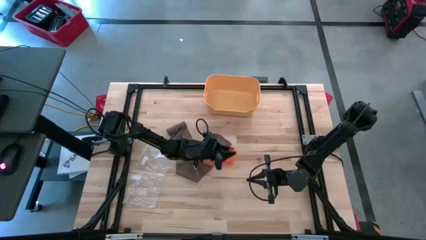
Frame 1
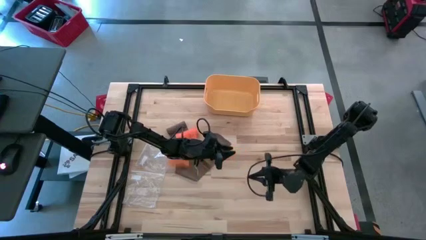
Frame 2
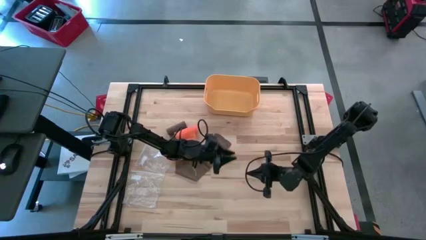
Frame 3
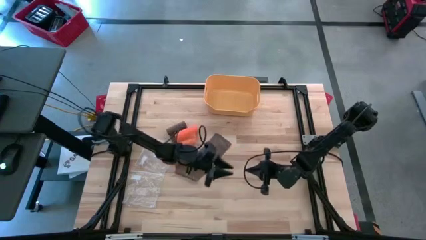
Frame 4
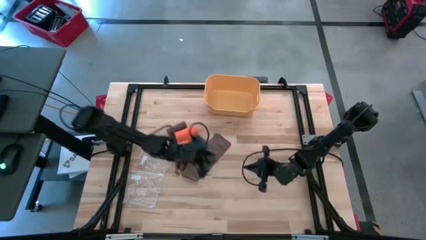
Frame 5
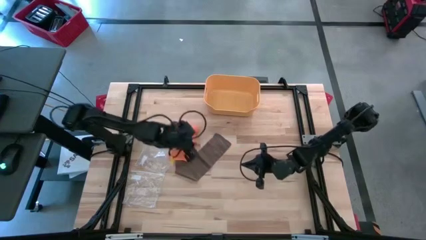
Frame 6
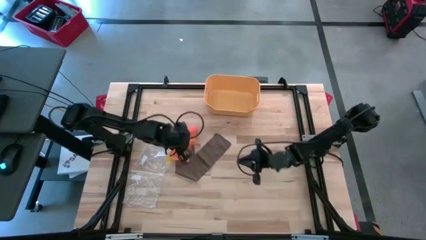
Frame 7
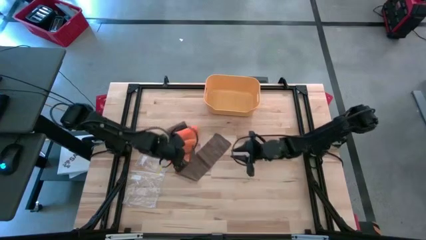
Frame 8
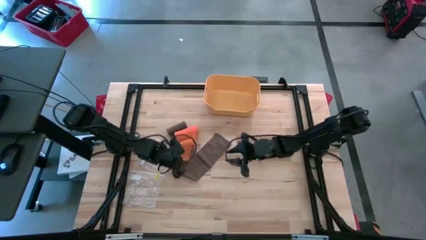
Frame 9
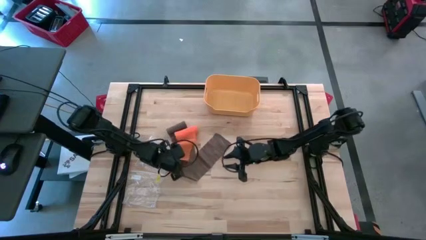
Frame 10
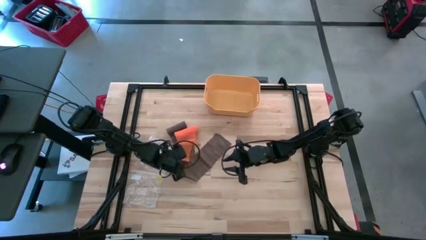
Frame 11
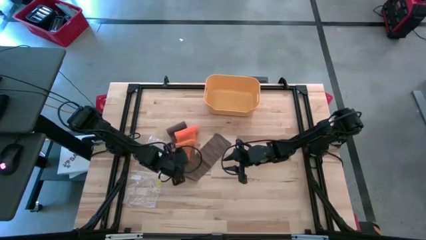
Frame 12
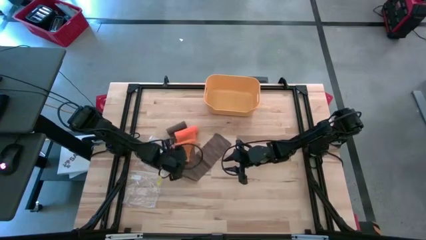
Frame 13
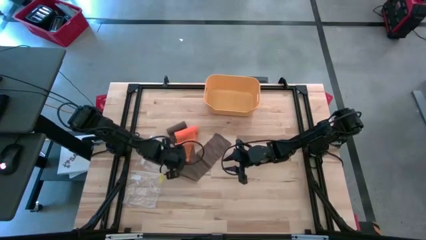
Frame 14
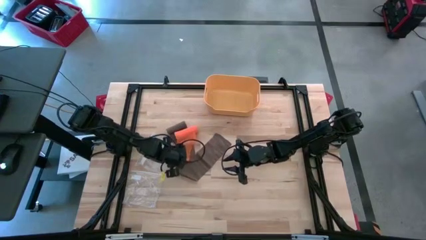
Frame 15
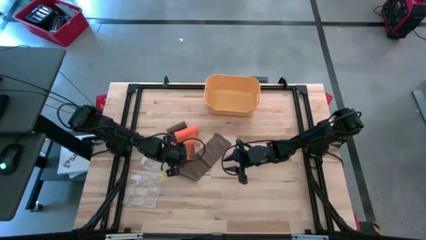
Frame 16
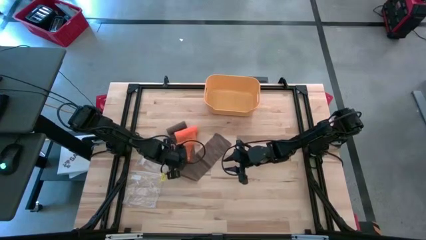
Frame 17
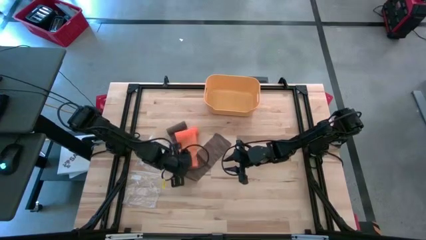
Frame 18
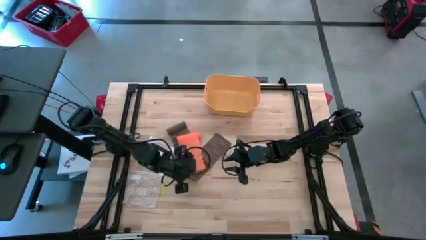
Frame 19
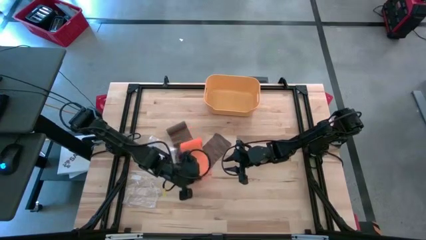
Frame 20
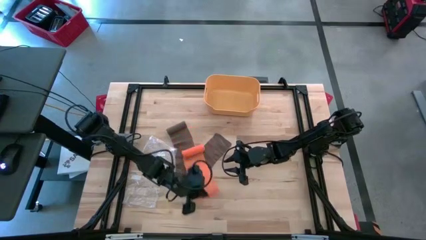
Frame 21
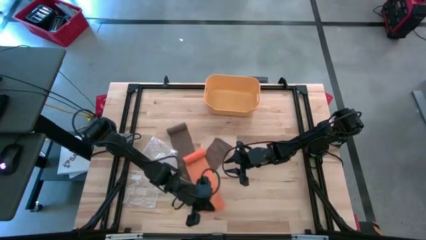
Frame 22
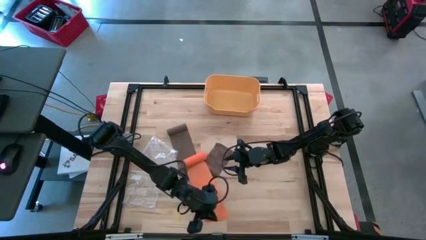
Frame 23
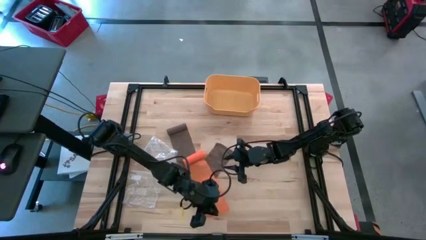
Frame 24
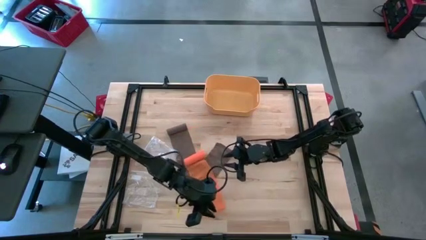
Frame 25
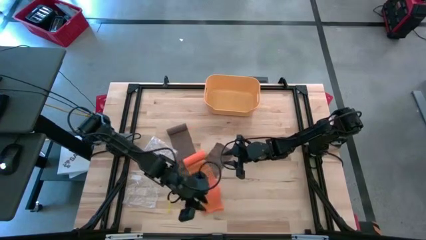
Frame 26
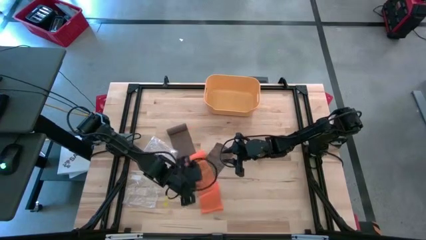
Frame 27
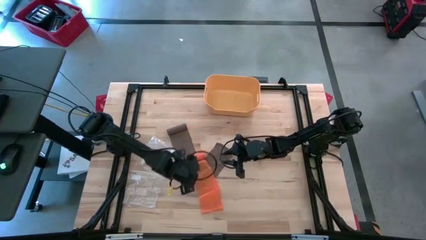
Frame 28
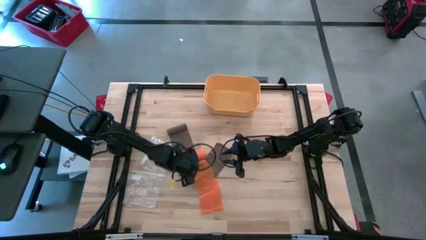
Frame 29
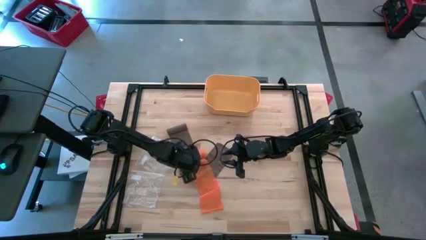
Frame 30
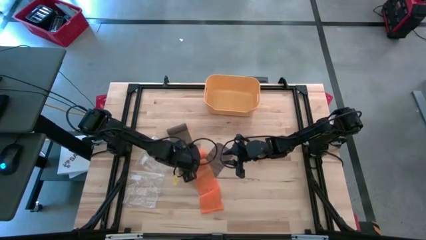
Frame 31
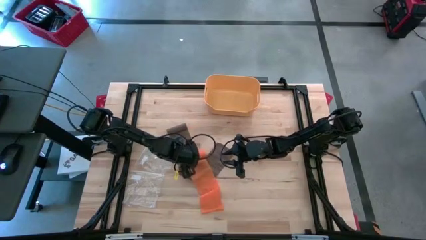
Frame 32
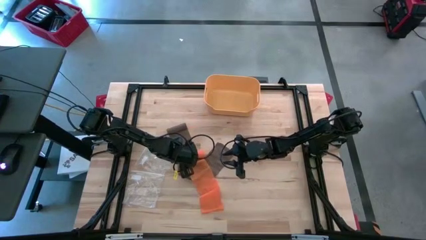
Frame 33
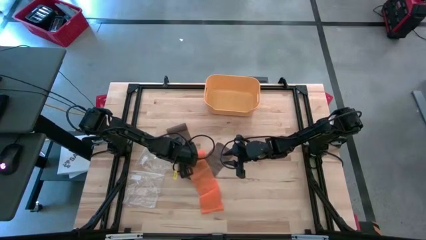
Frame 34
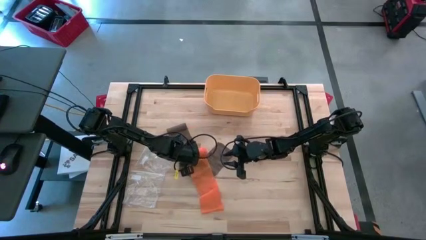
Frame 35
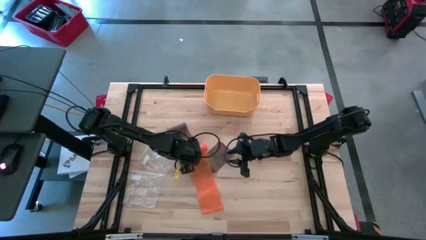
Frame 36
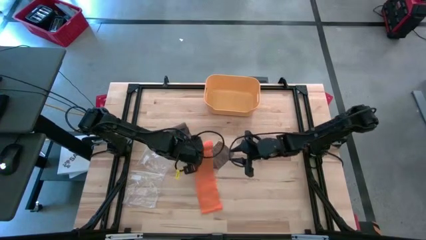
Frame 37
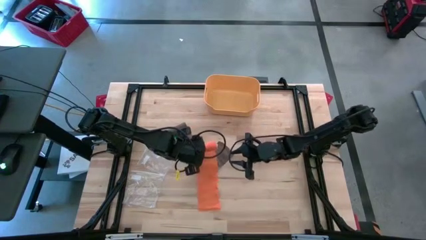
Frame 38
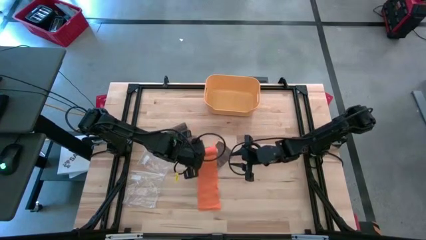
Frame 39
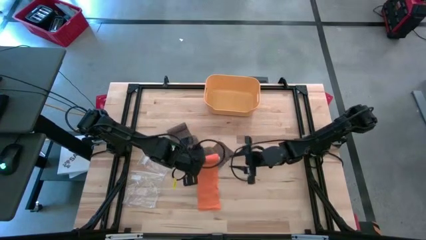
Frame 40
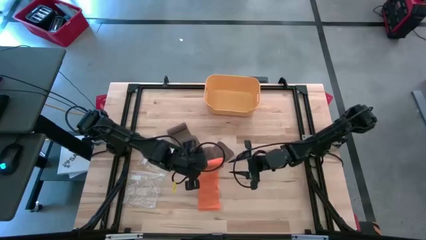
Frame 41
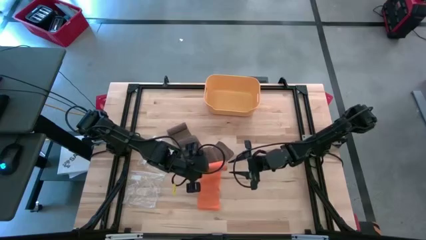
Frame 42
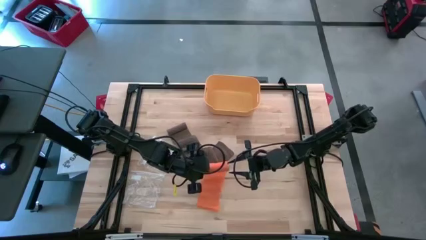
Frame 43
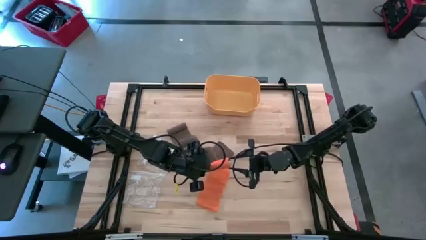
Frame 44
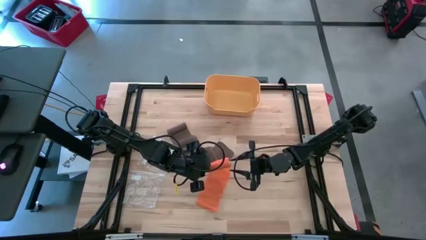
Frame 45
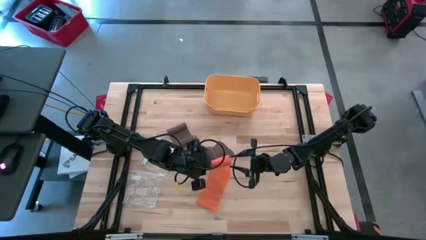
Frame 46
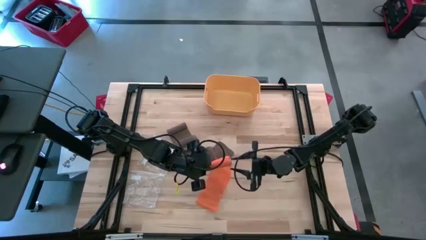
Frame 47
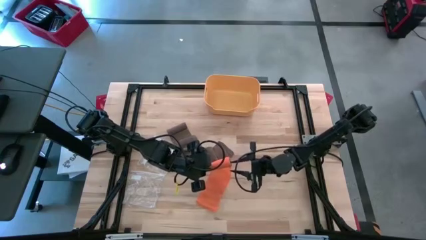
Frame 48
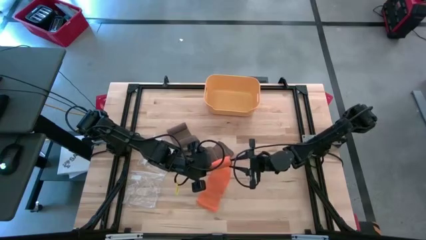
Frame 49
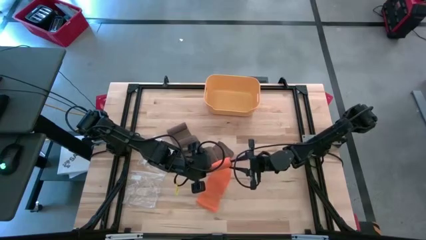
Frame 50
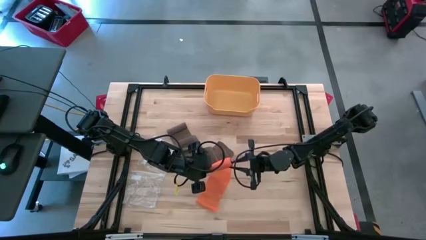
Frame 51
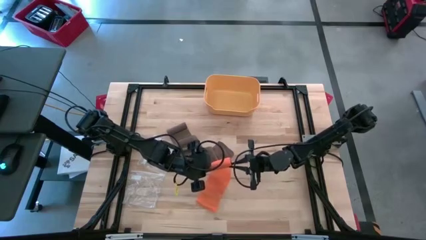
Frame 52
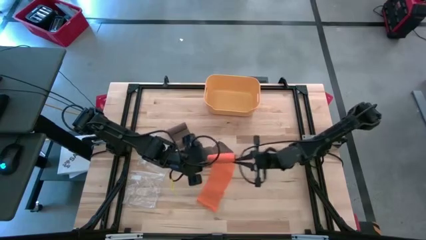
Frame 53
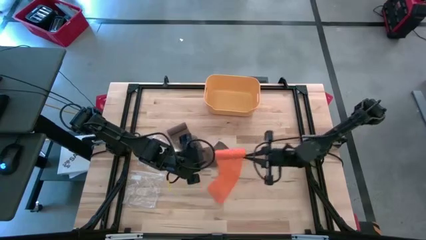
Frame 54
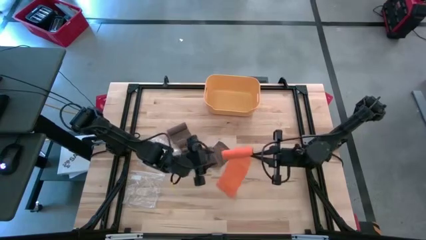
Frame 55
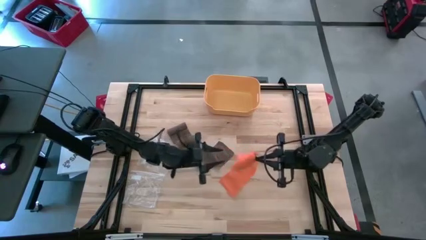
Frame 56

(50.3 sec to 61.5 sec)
Task: Roll bandage
Roll the orange bandage

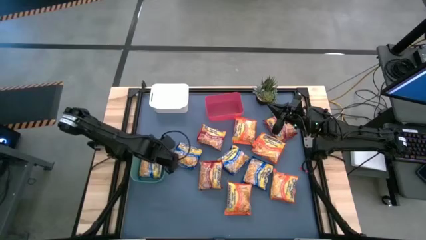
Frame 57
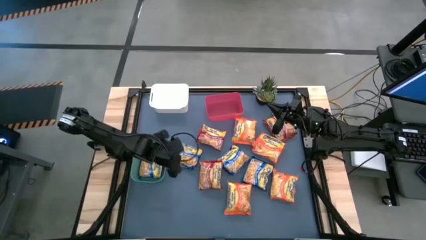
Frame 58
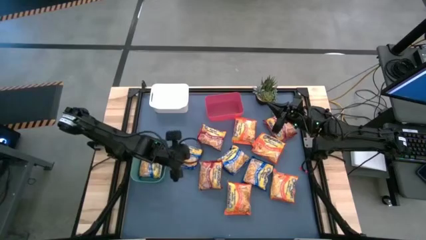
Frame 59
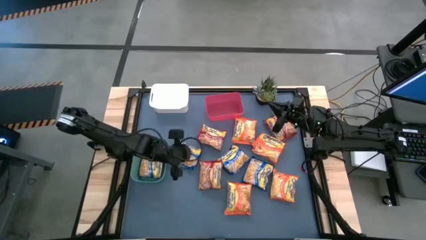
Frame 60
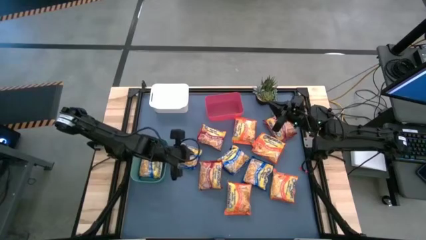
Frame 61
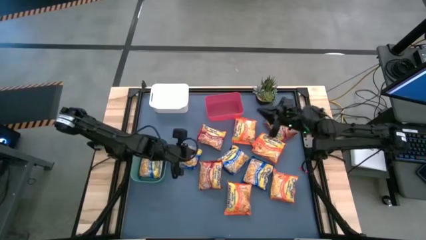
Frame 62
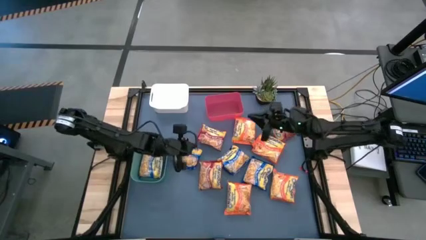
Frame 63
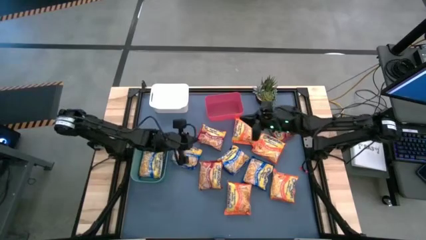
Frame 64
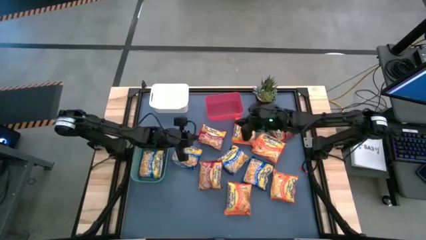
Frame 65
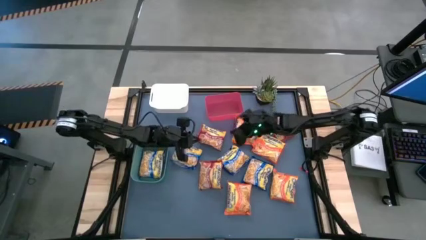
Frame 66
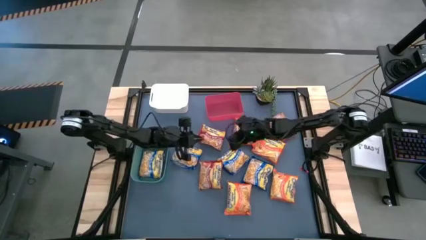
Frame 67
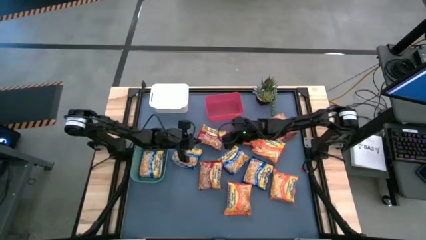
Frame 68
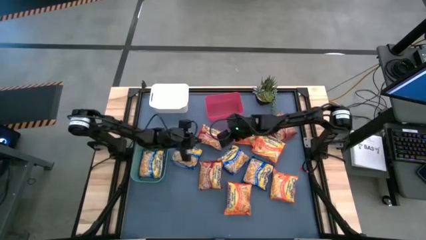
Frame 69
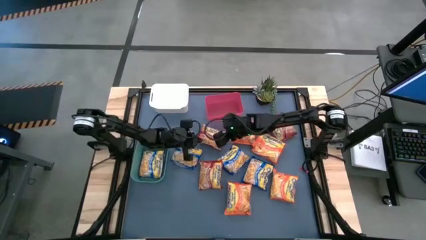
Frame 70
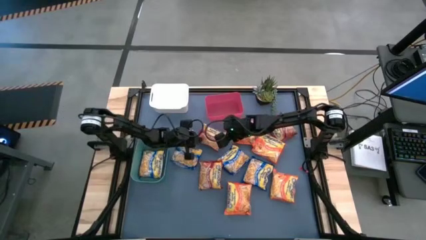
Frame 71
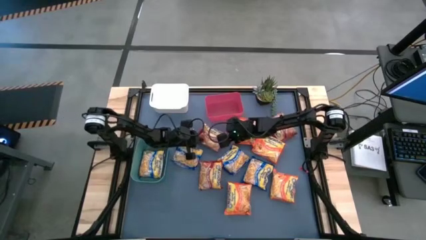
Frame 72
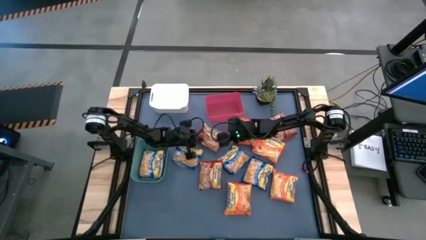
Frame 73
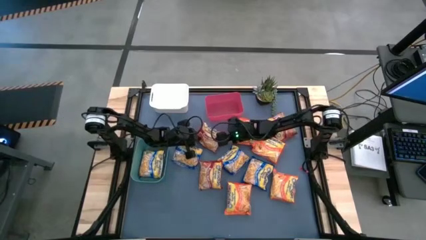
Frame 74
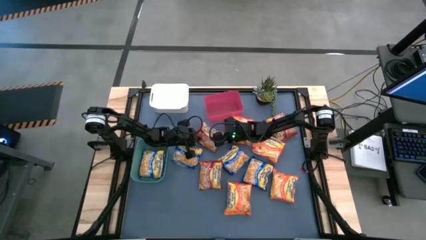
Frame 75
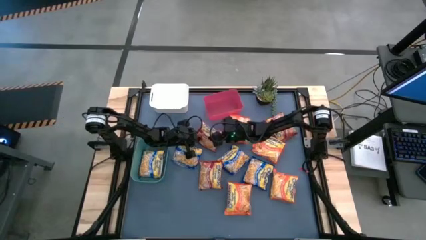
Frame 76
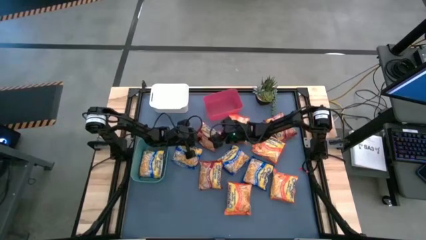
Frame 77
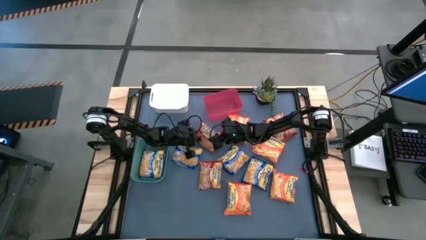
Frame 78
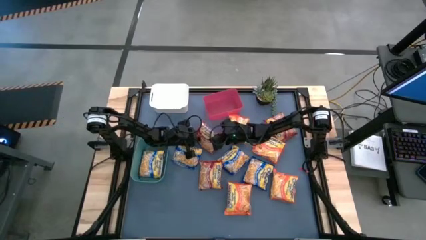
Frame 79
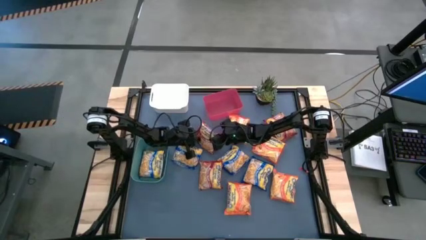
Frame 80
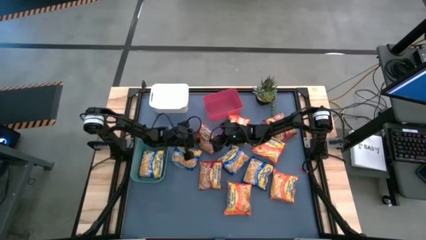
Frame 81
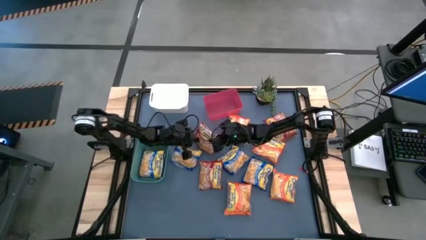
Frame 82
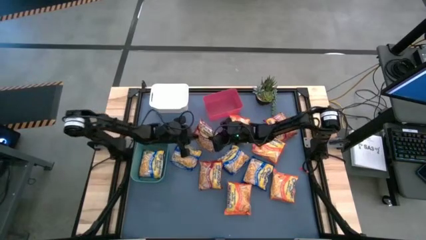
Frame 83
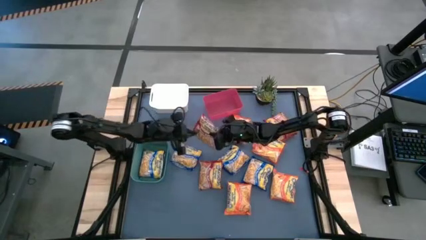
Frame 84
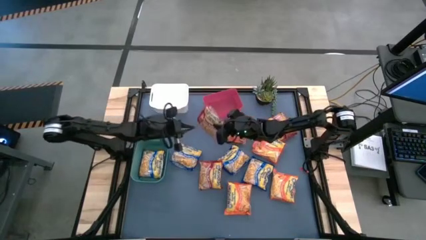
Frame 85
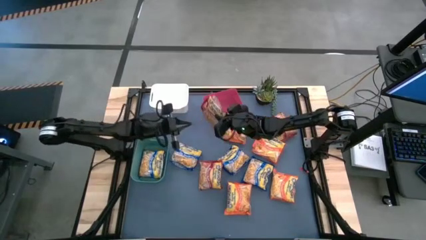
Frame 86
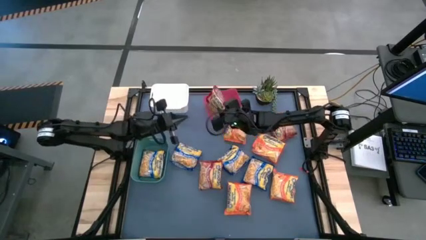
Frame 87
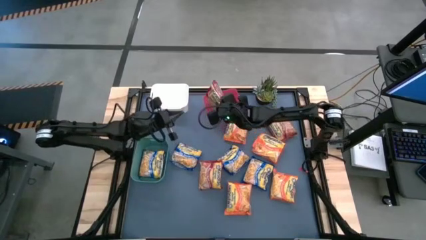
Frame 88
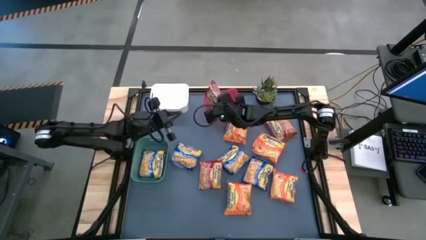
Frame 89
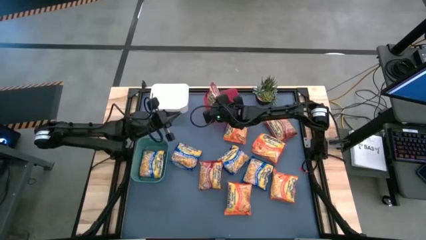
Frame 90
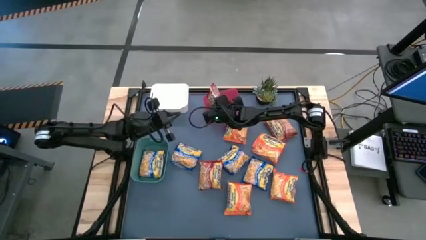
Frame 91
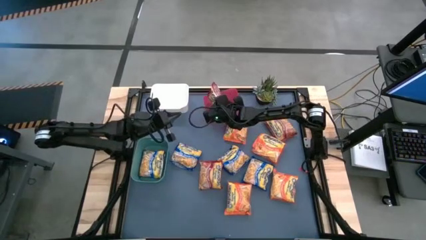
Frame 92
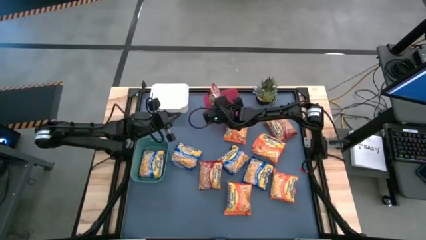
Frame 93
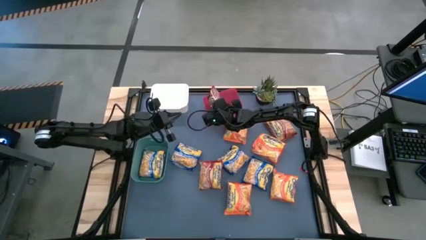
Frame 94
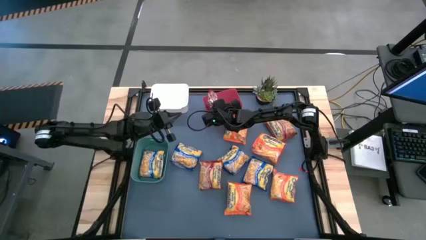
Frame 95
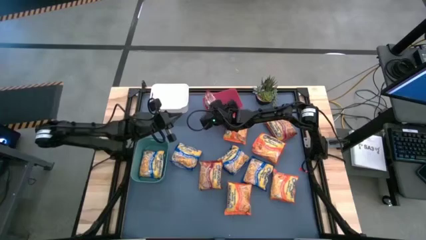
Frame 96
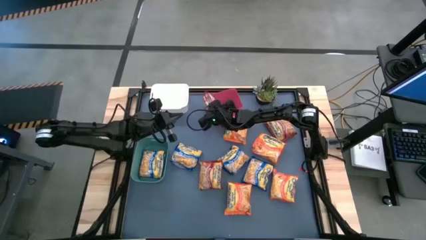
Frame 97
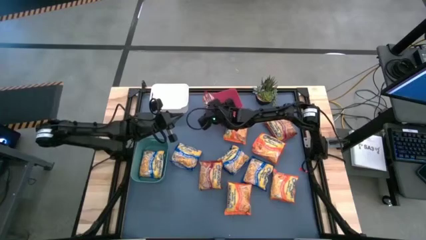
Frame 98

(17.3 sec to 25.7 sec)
Task: Sort Maruchan noodles
Put the red noodle pack into the red bin
